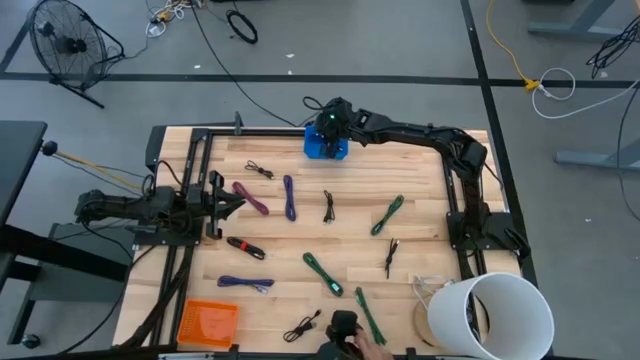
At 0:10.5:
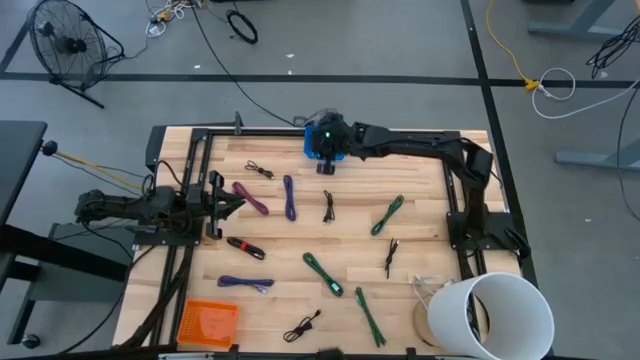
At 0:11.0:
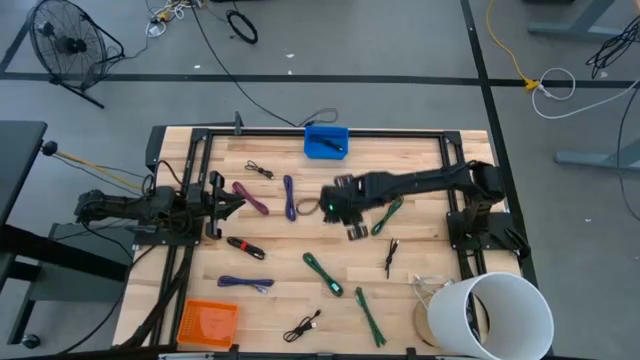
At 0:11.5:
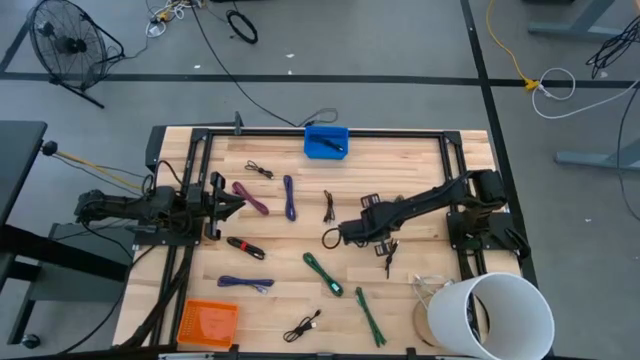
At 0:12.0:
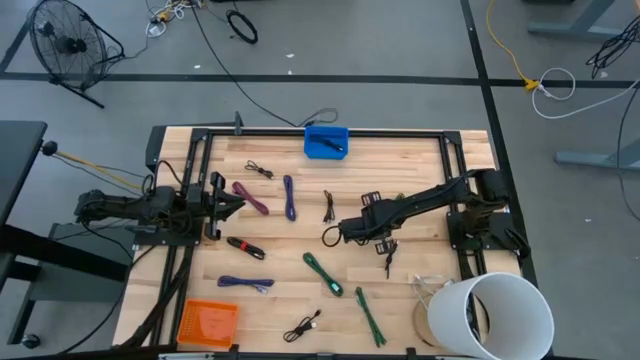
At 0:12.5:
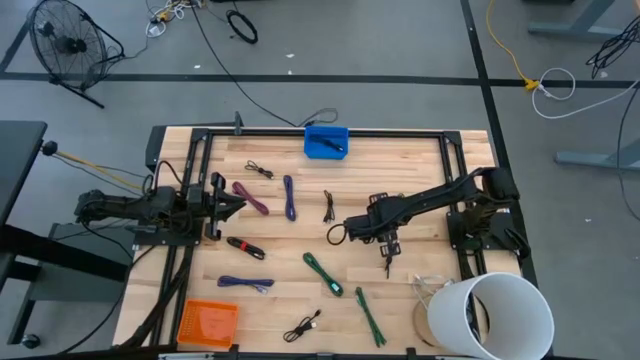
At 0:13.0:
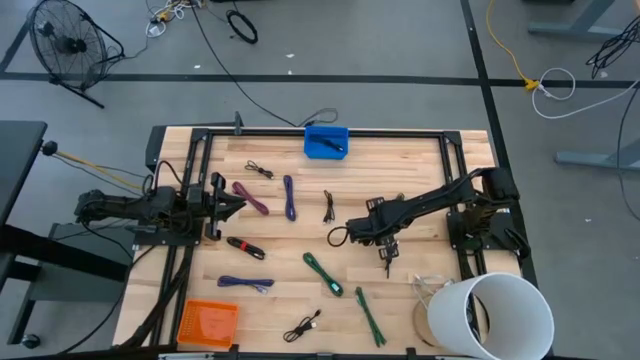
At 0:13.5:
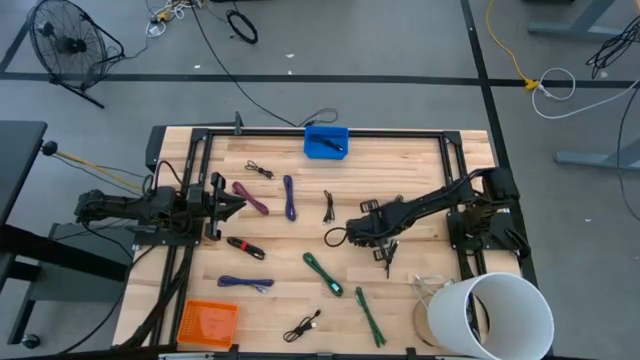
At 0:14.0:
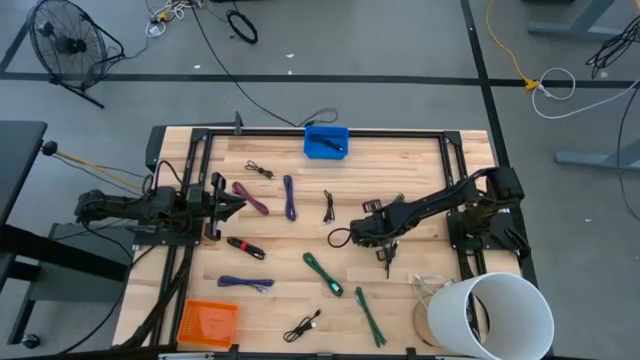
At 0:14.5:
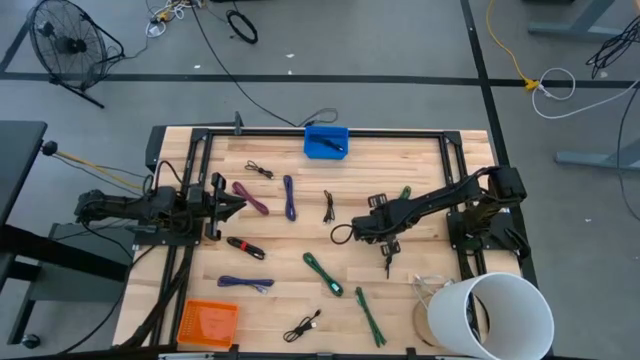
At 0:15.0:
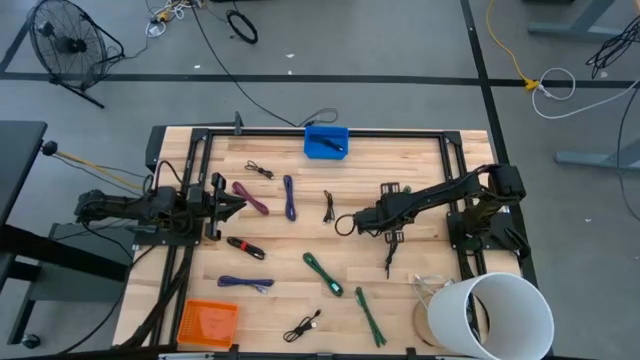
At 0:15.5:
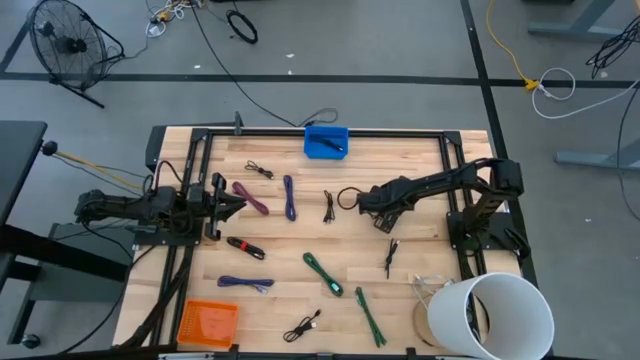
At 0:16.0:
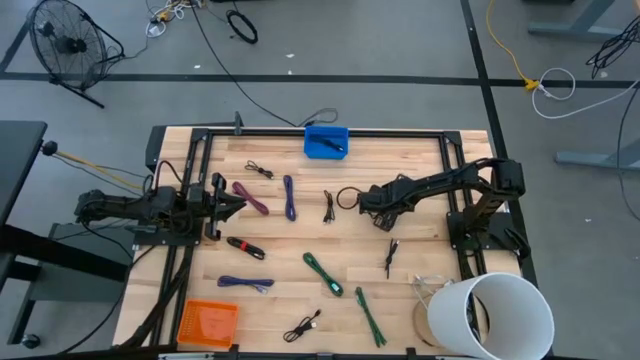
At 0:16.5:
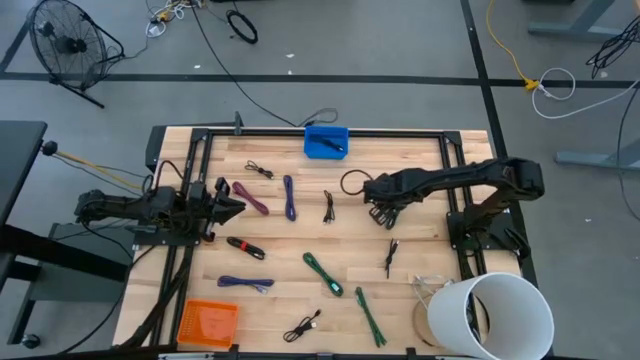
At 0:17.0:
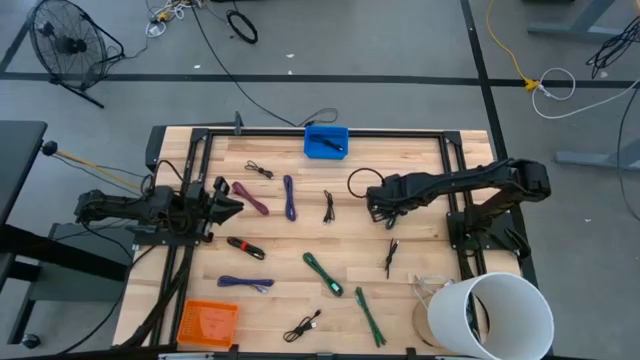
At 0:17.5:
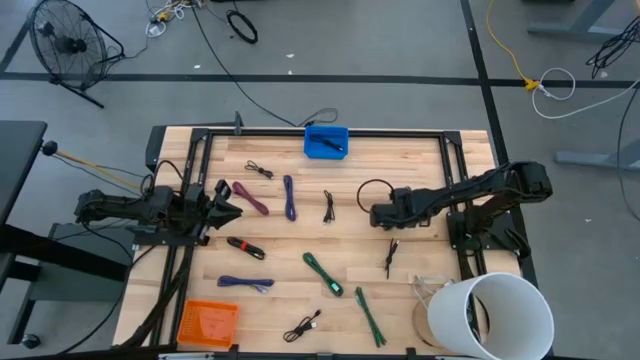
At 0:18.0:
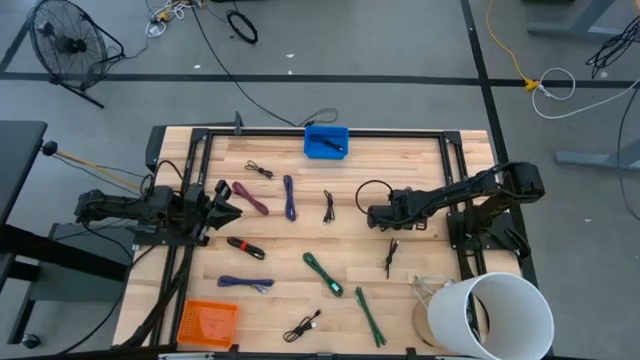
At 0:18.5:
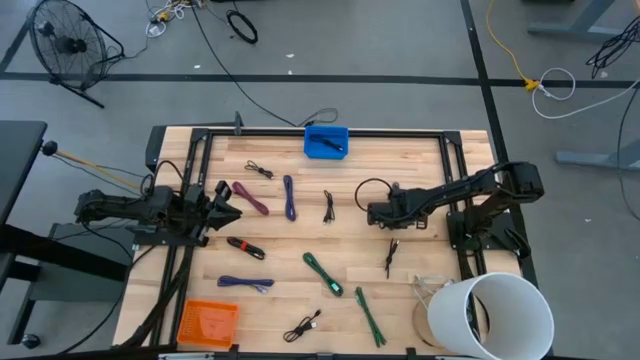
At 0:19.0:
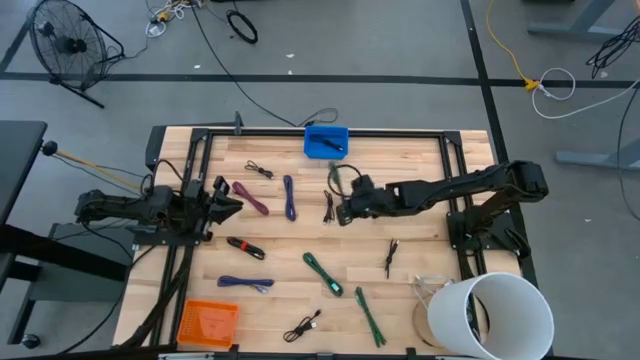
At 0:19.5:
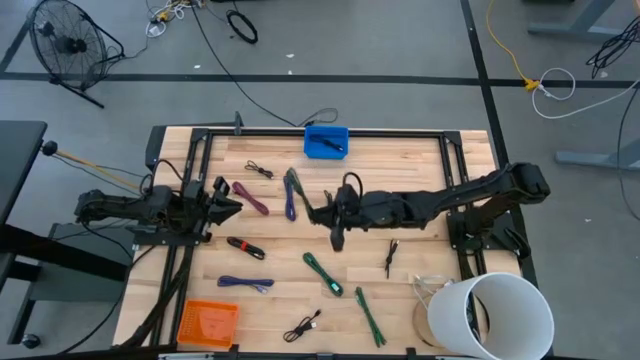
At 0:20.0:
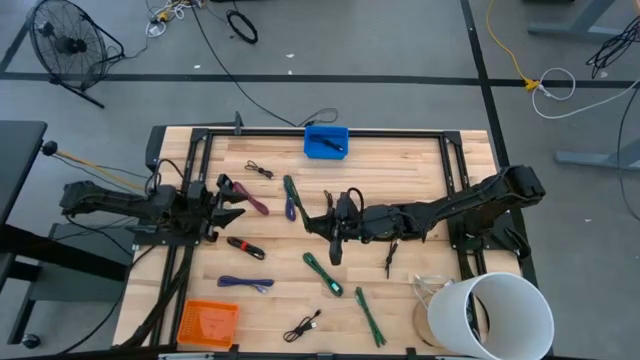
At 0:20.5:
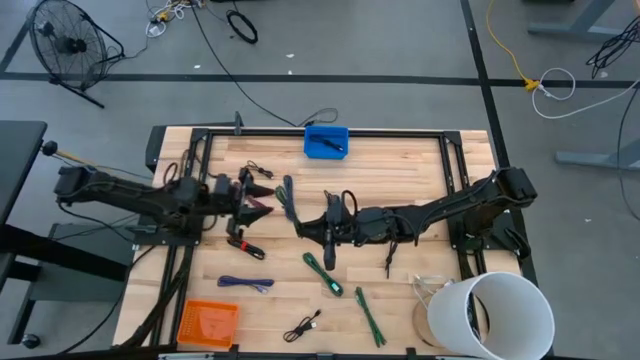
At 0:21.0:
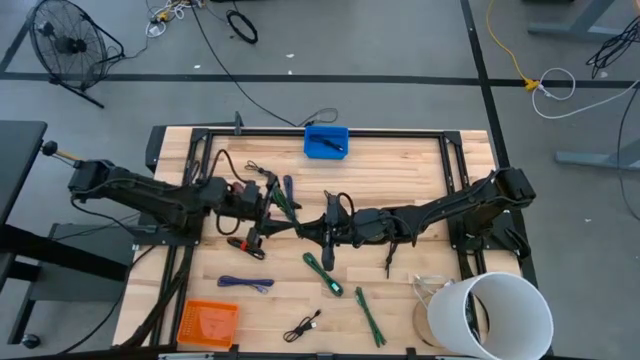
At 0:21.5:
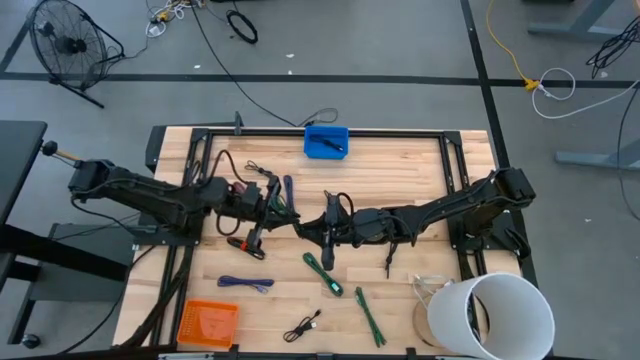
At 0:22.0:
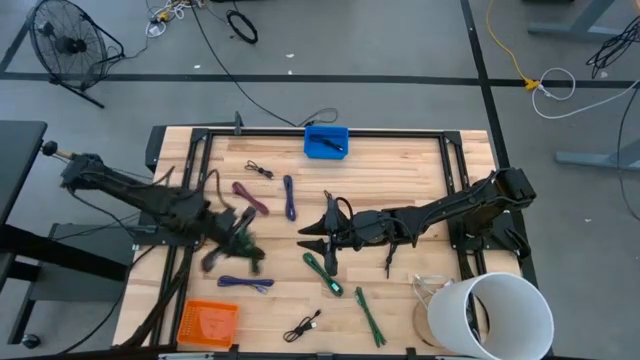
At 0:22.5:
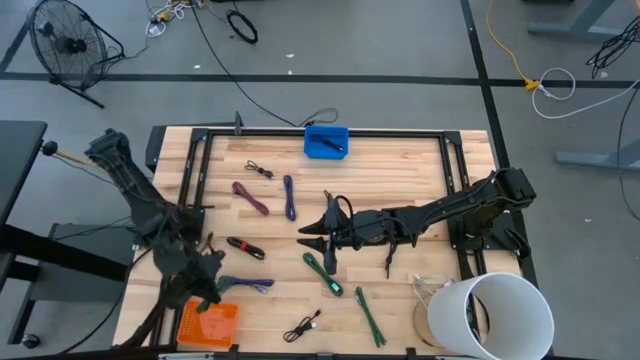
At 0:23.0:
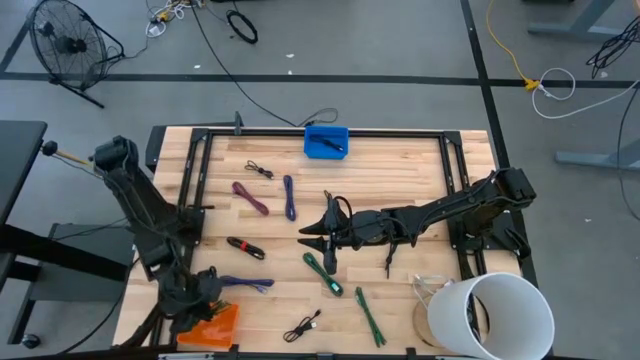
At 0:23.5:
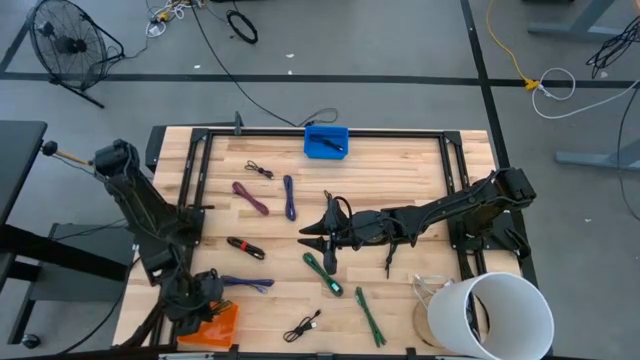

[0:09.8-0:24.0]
Task: Pick & Place USB Port
Put the green black charger cable into the orange bin

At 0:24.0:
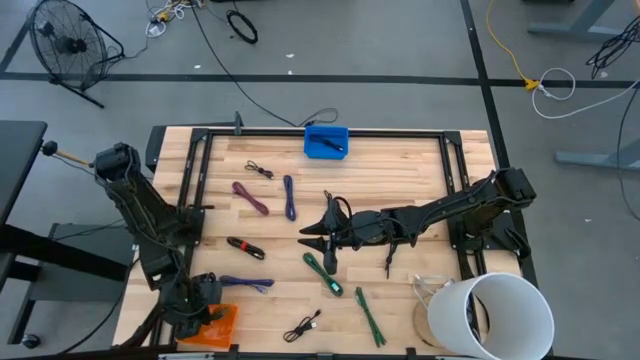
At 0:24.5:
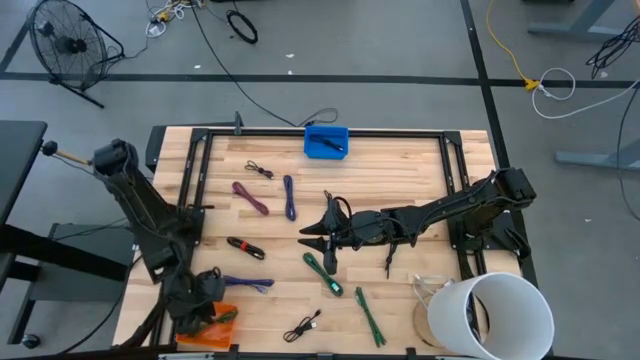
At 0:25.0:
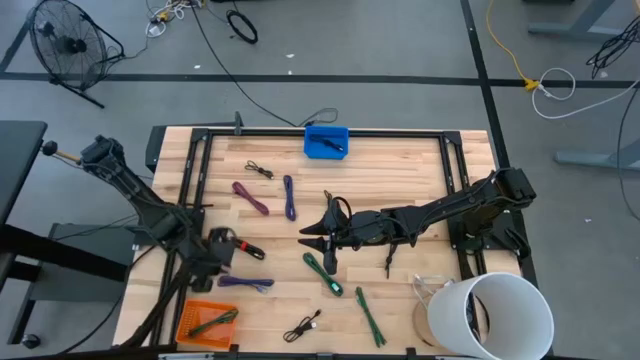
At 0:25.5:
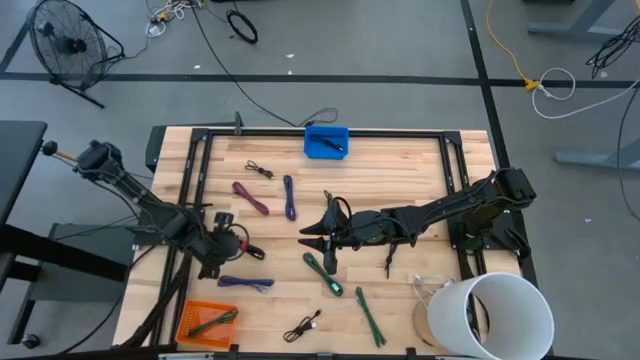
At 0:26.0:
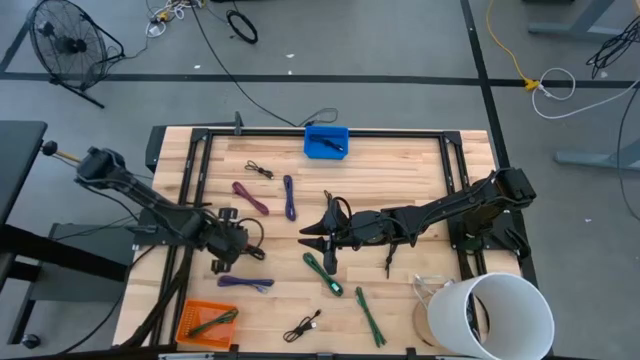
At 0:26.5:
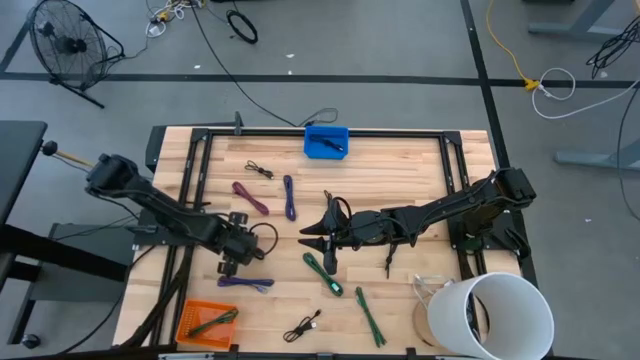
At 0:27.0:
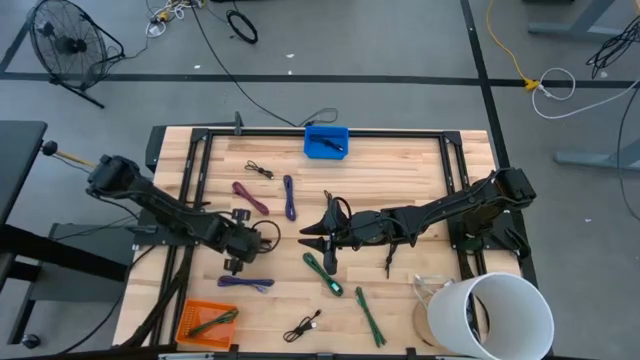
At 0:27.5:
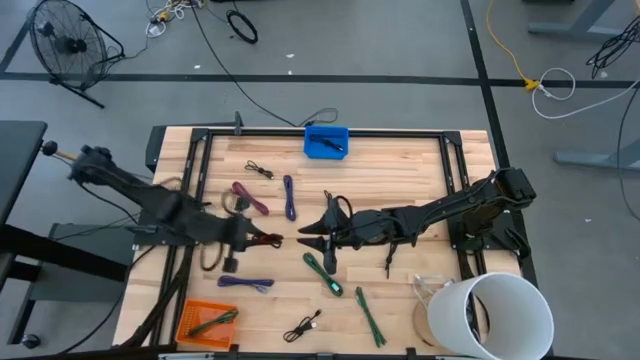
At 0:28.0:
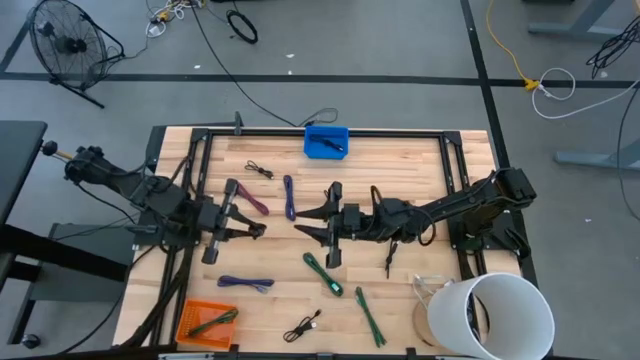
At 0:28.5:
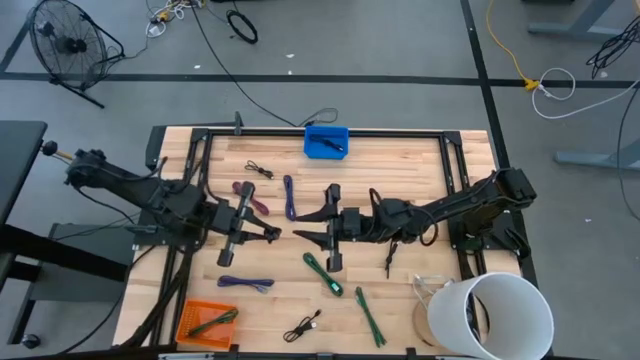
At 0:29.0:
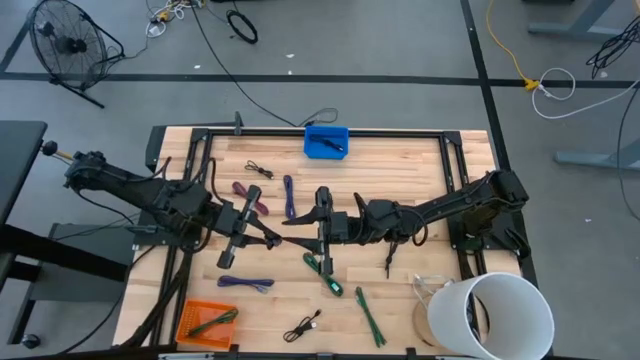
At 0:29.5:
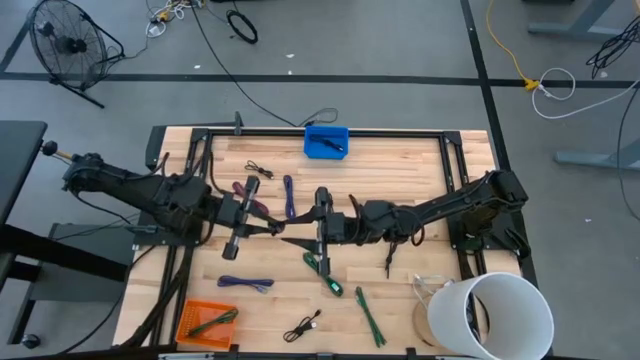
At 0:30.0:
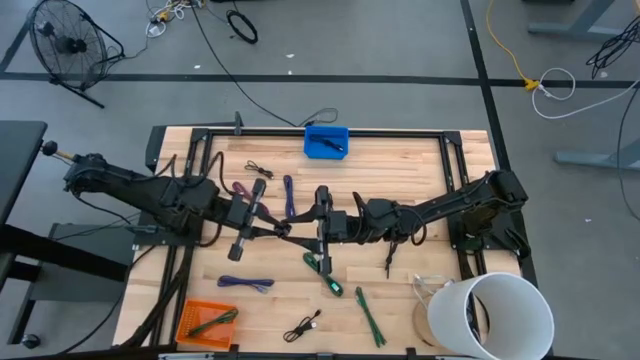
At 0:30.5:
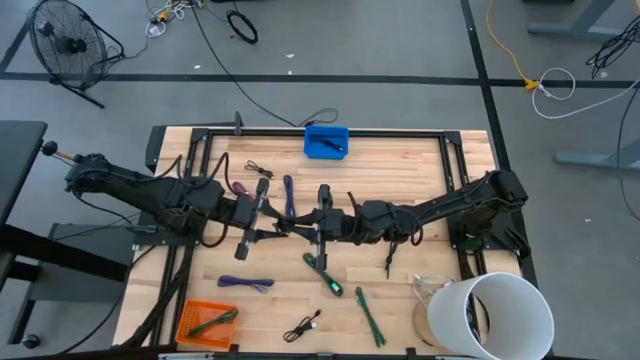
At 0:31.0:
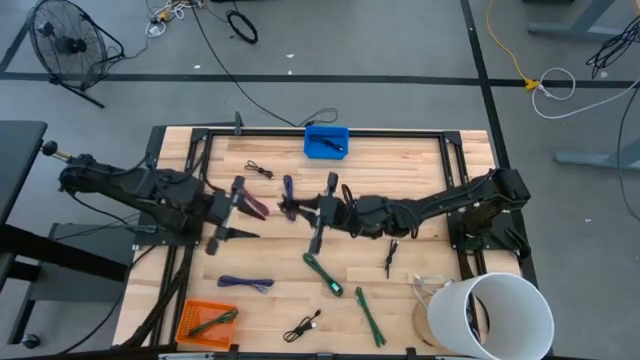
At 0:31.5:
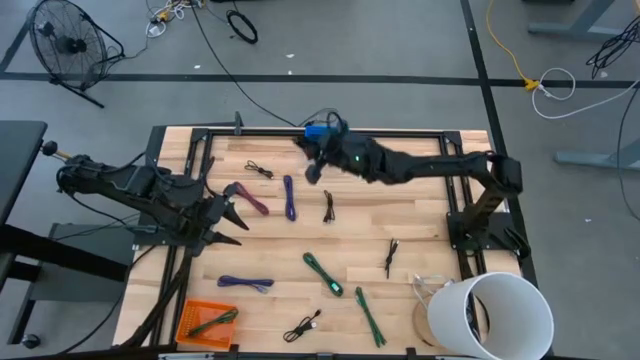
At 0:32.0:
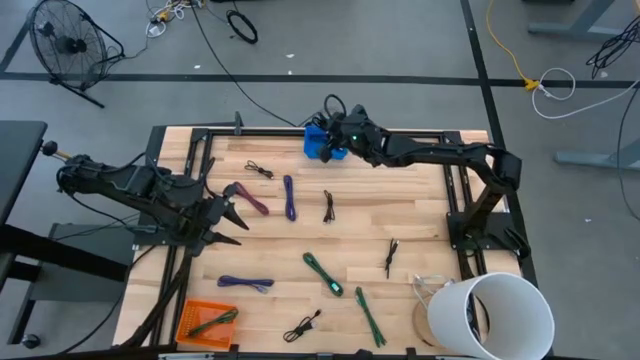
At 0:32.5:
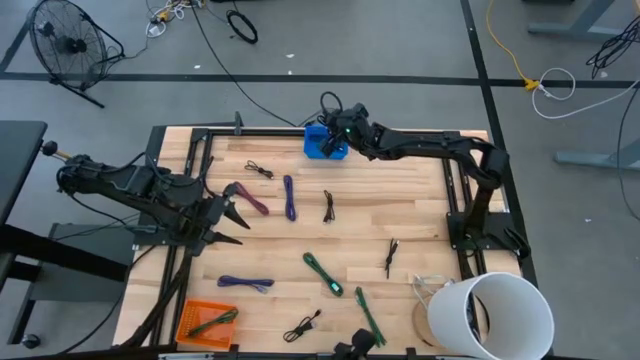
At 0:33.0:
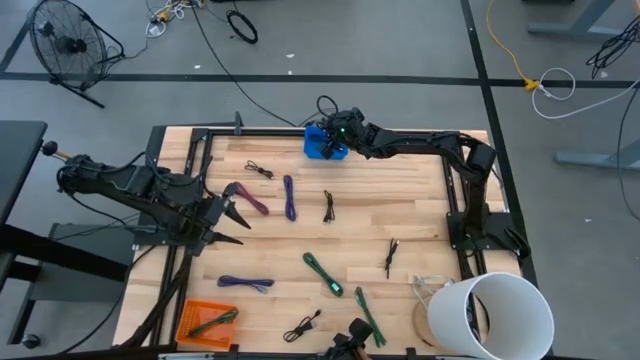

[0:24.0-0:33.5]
Put the black charger cable into the blue bin
